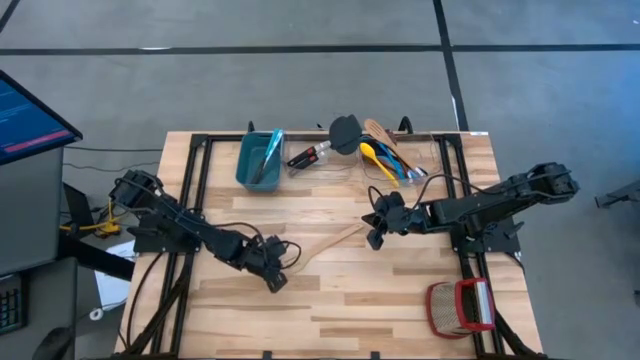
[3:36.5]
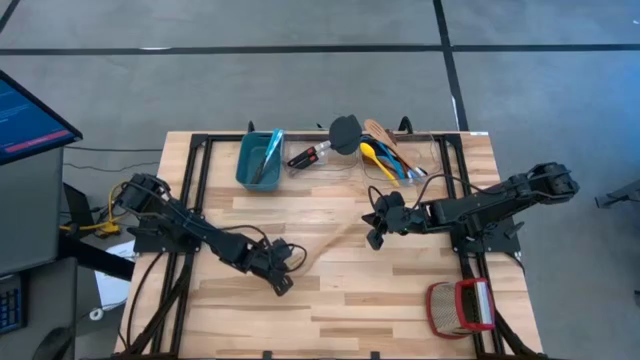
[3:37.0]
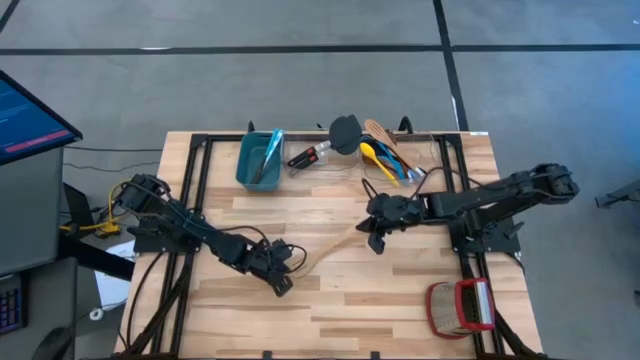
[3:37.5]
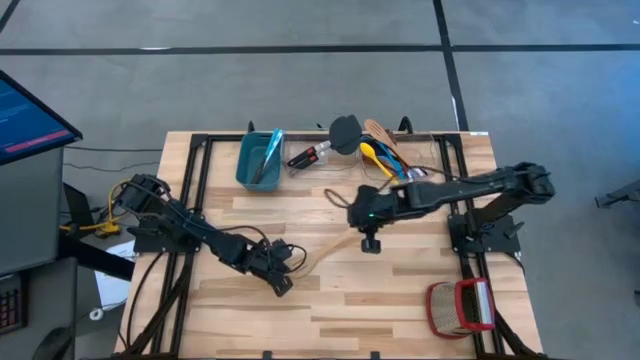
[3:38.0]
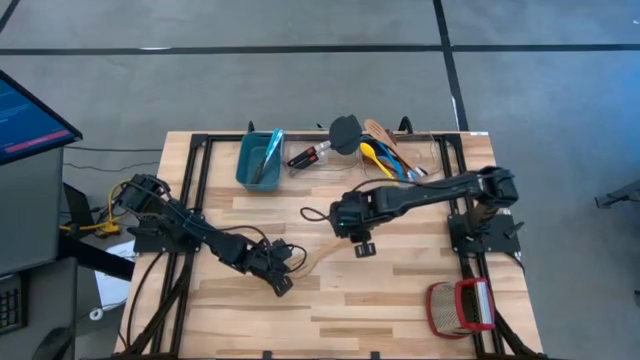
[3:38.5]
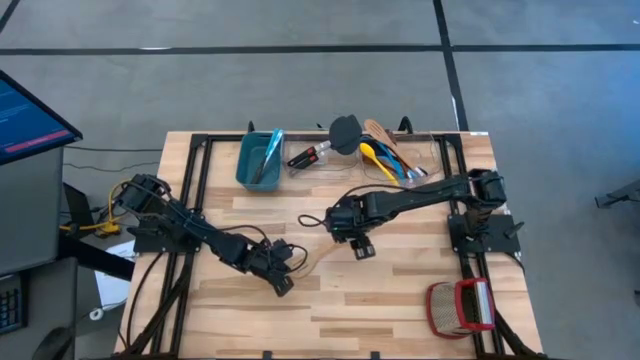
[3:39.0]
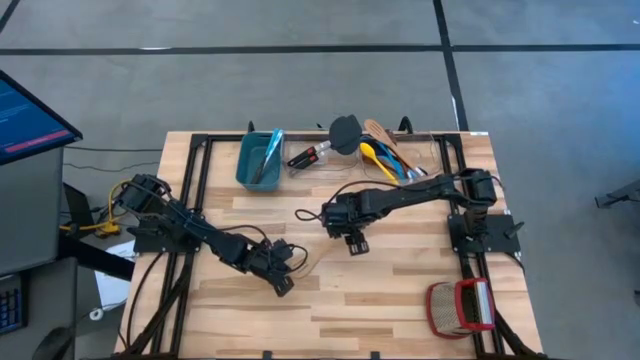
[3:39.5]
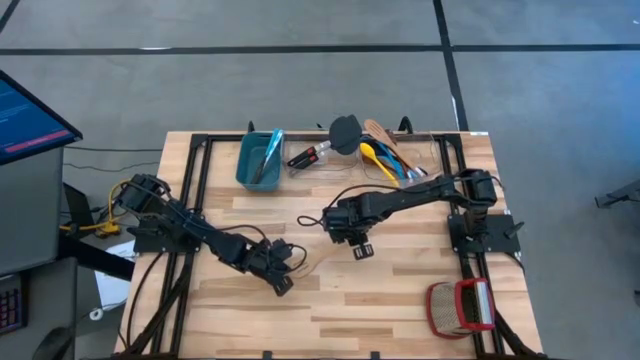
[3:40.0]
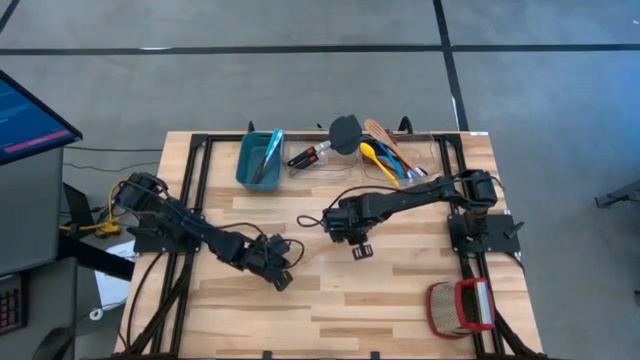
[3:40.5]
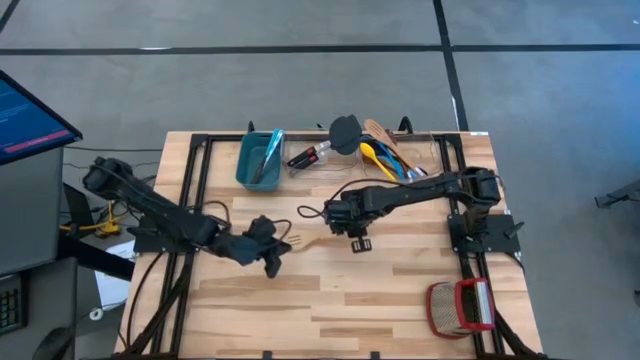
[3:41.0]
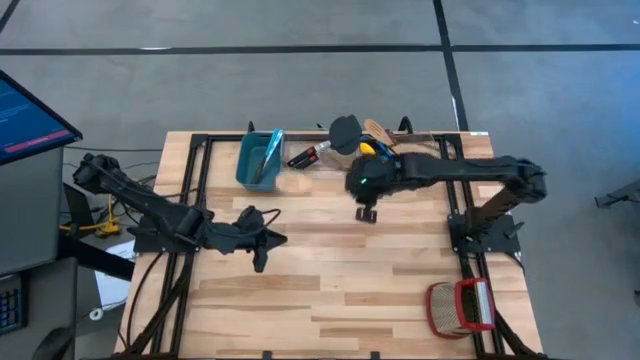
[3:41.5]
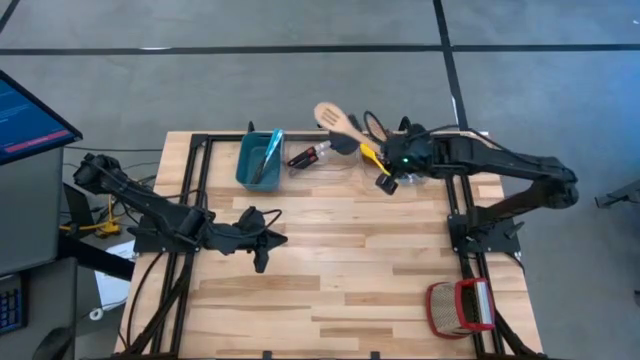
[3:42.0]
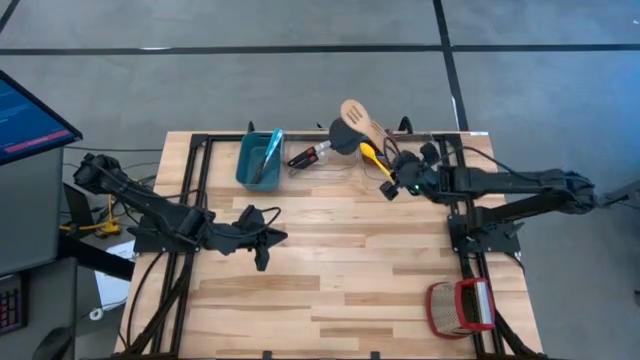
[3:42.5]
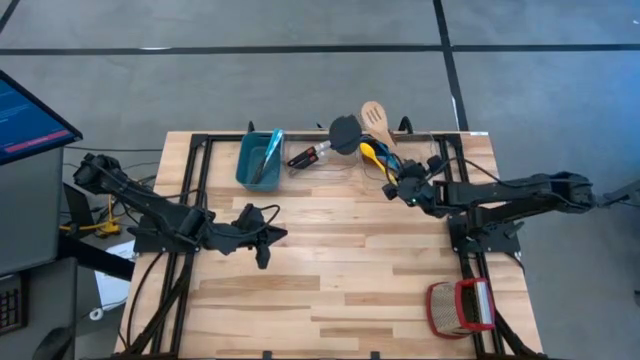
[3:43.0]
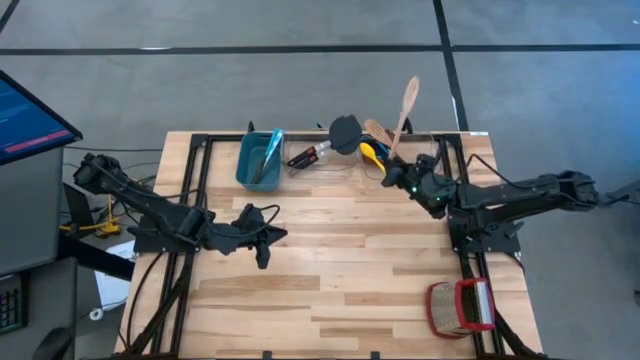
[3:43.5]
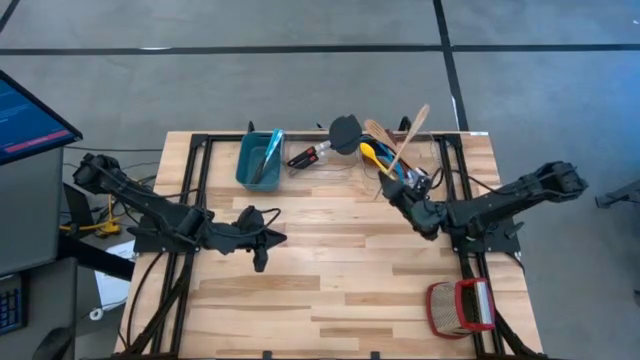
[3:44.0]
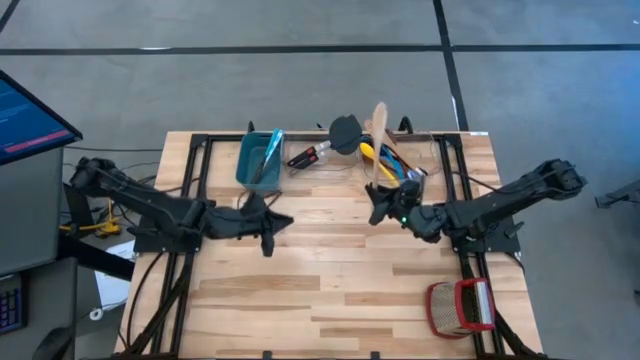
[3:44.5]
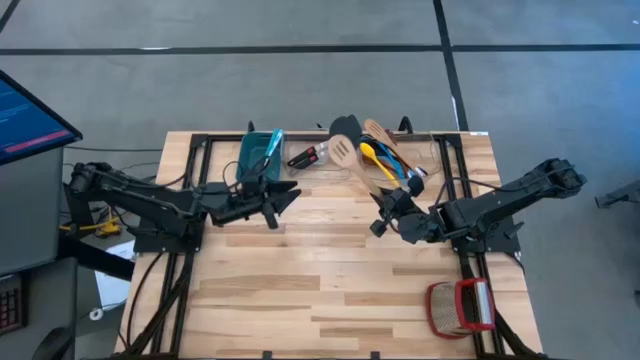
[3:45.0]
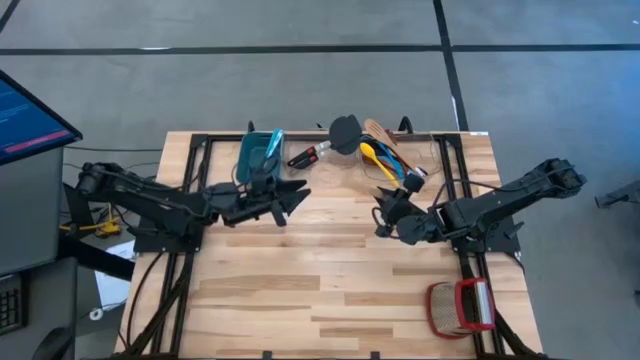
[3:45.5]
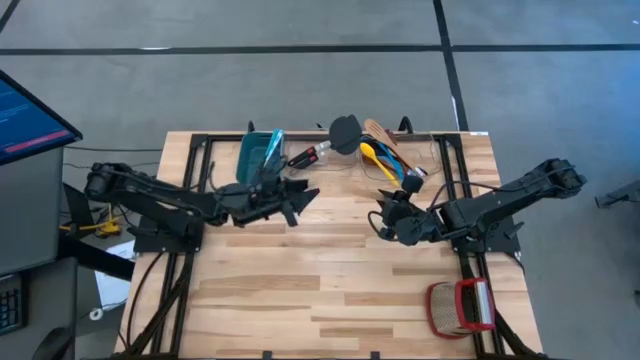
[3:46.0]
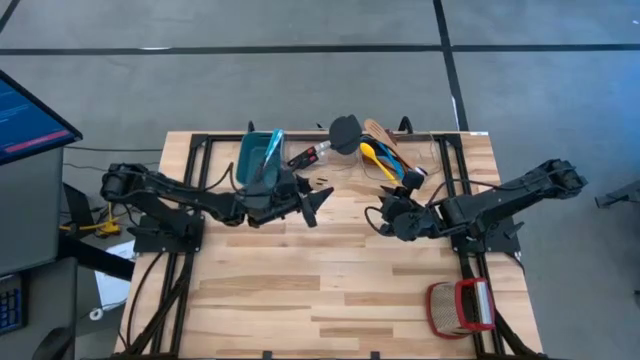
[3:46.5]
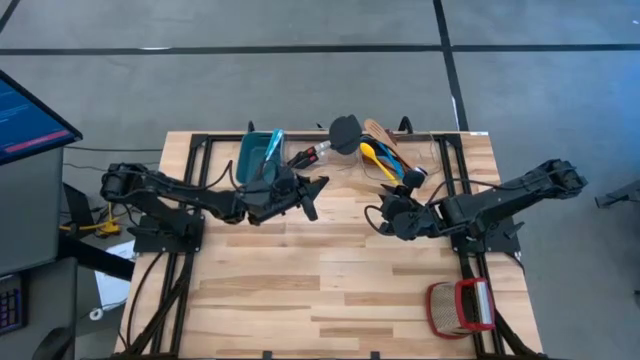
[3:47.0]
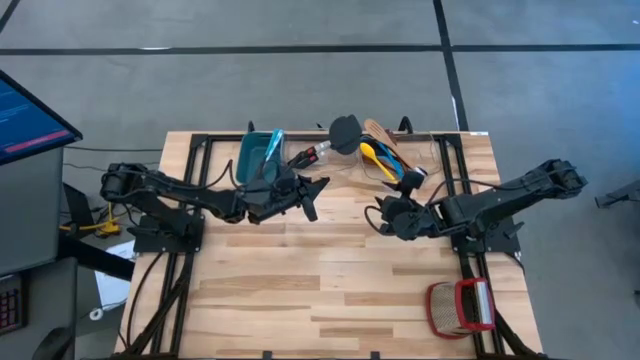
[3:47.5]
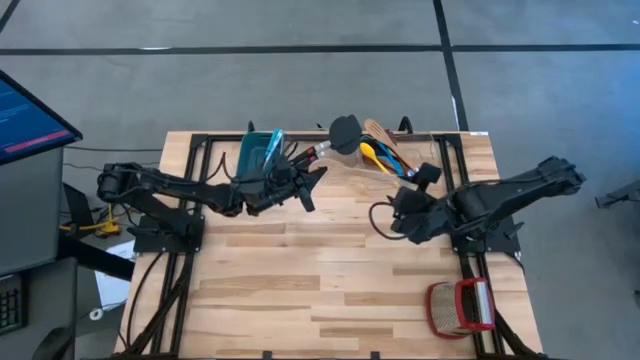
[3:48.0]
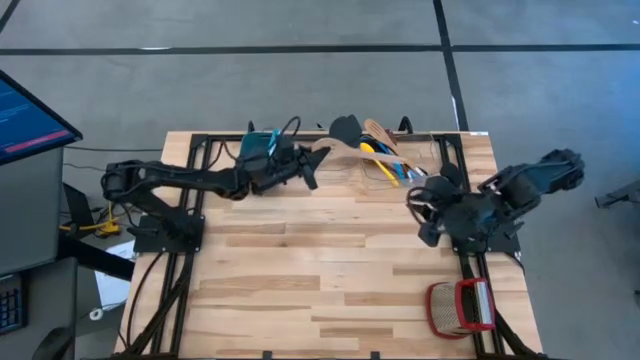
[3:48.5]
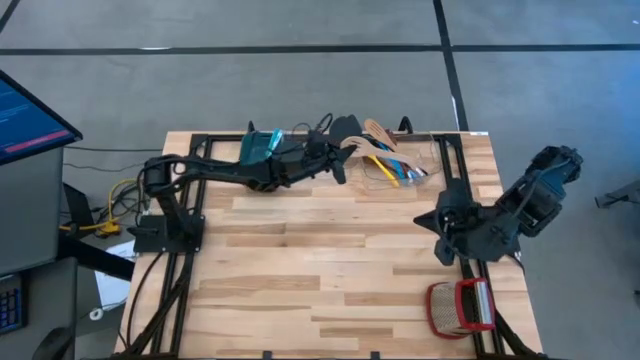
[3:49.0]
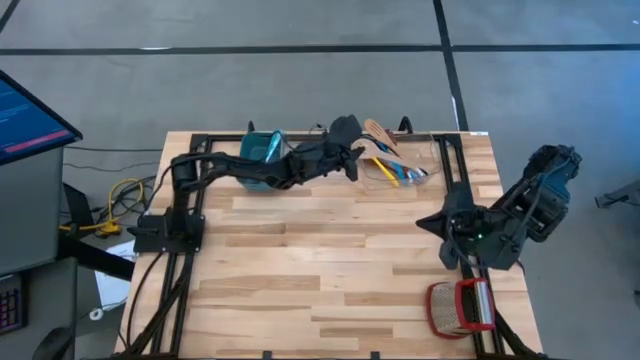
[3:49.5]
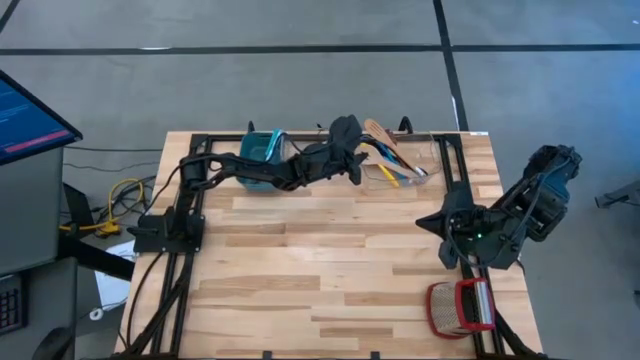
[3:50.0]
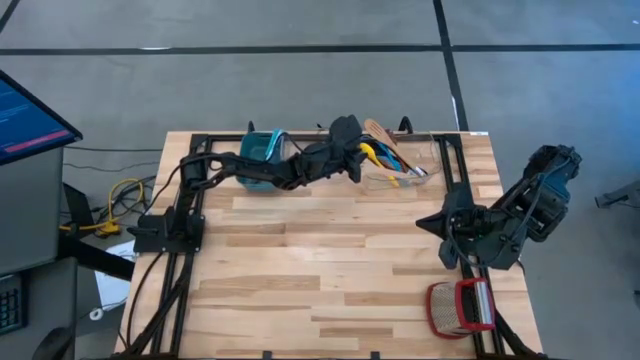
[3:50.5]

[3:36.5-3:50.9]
Task: Pick & Place Kitchen Items
Put the brown slotted serving spoon into the right transparent bin

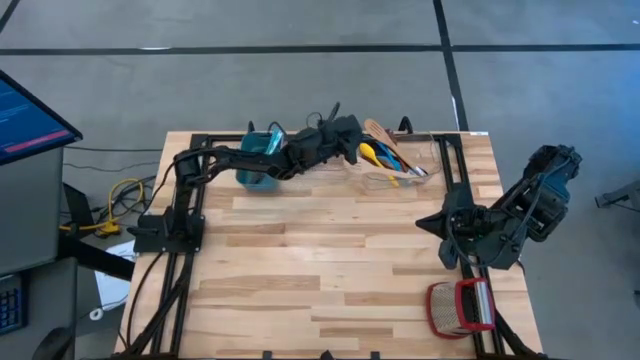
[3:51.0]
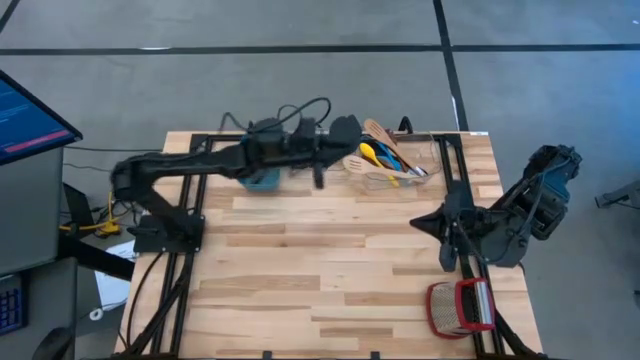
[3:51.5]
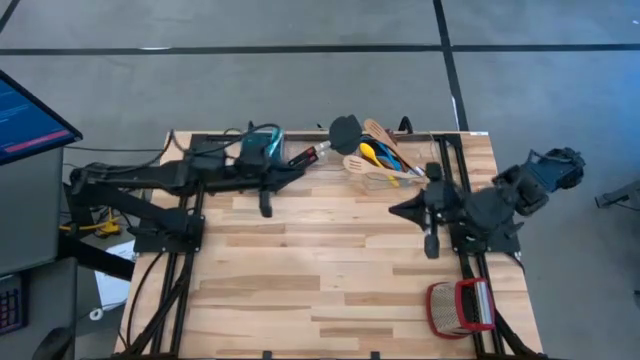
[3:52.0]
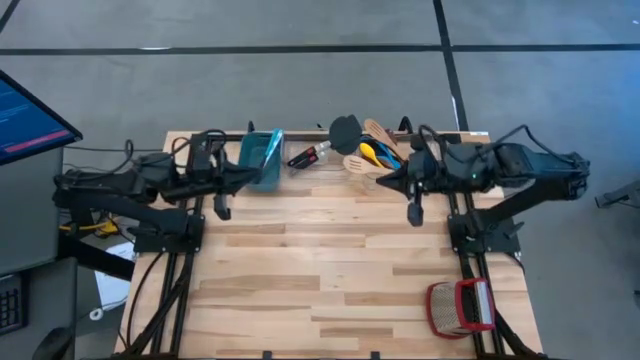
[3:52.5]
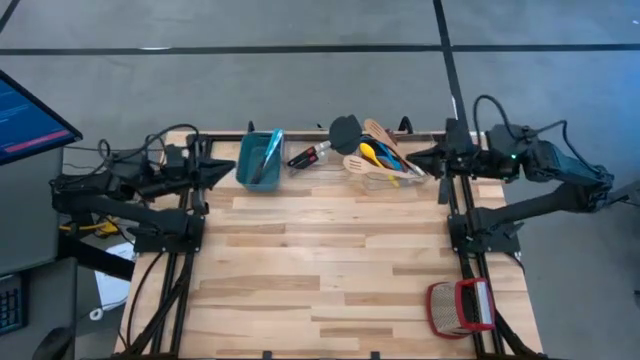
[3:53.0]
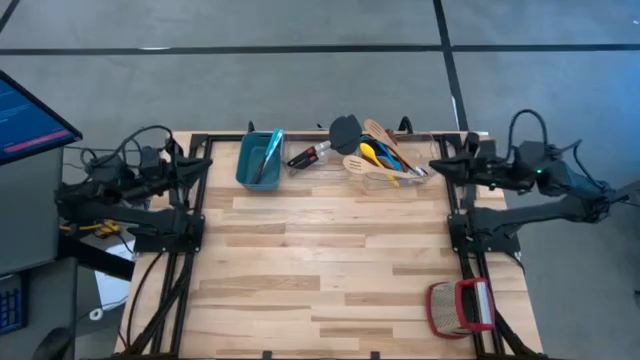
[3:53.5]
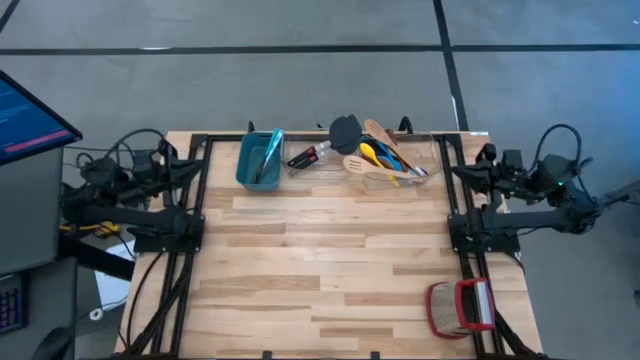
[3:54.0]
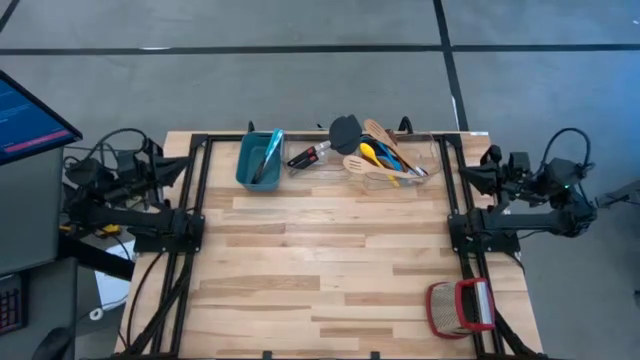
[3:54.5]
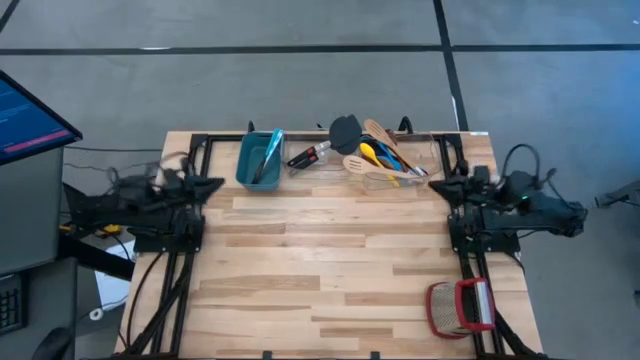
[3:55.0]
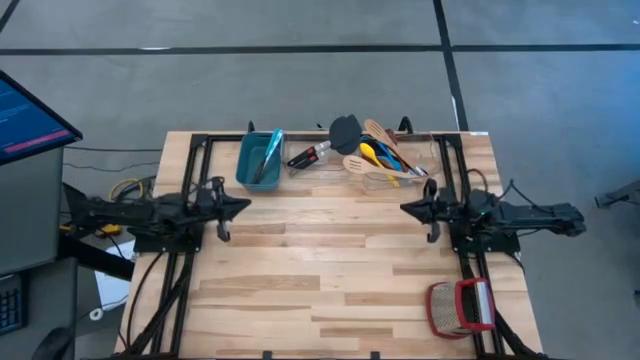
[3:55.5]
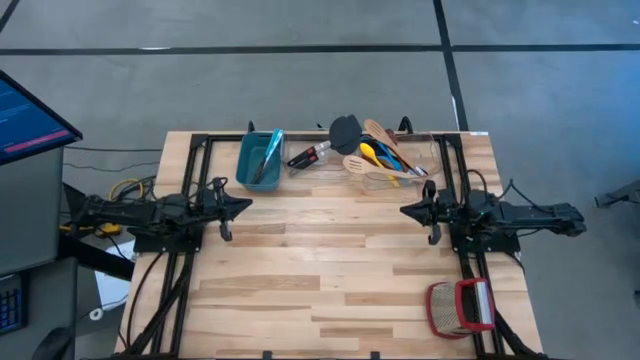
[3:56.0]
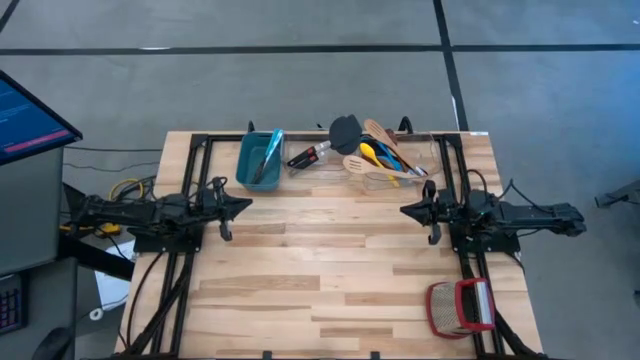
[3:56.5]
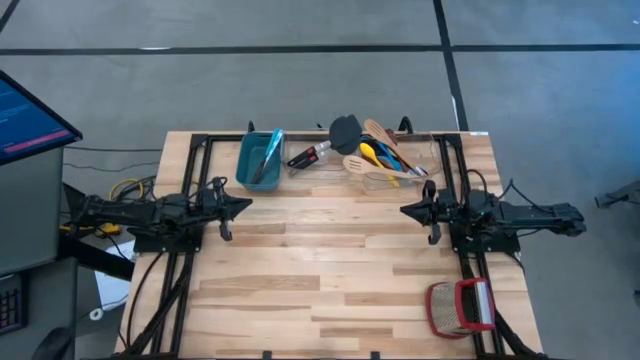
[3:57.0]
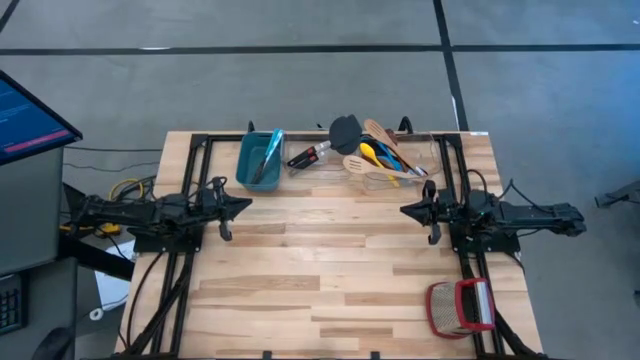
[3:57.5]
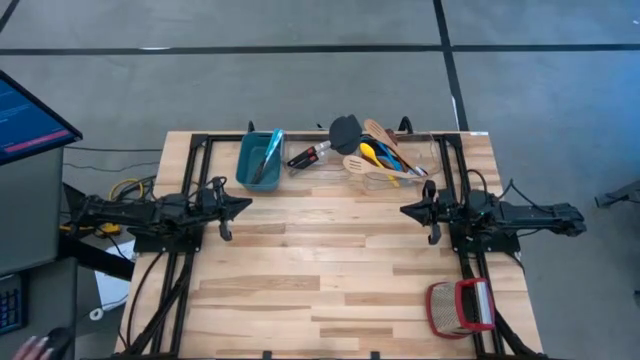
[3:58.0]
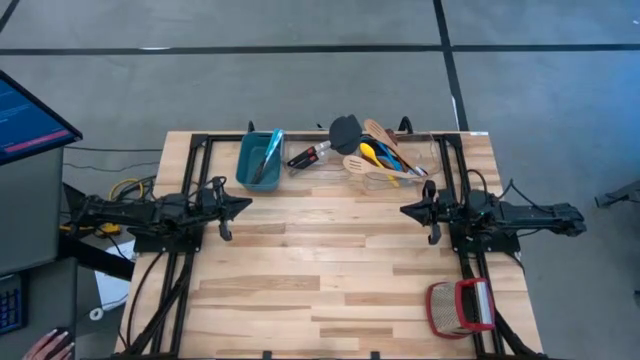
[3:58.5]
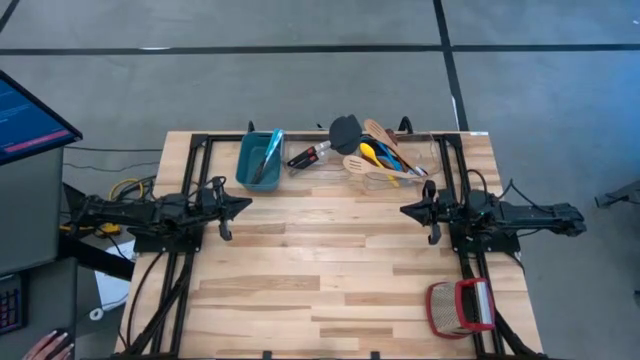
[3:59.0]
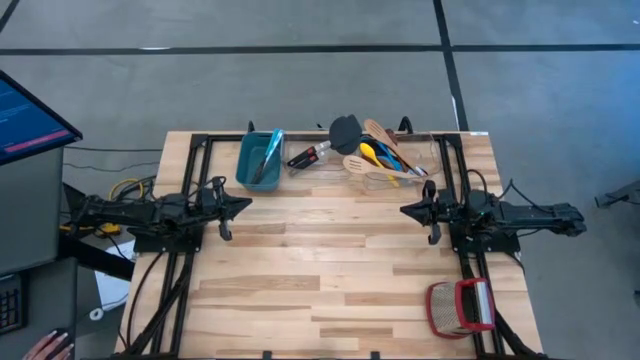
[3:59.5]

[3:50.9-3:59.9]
Return to Home Position
